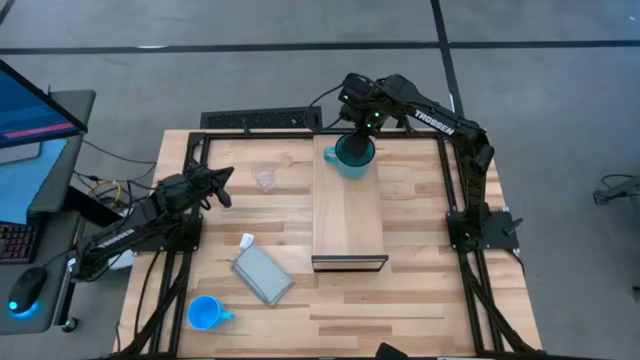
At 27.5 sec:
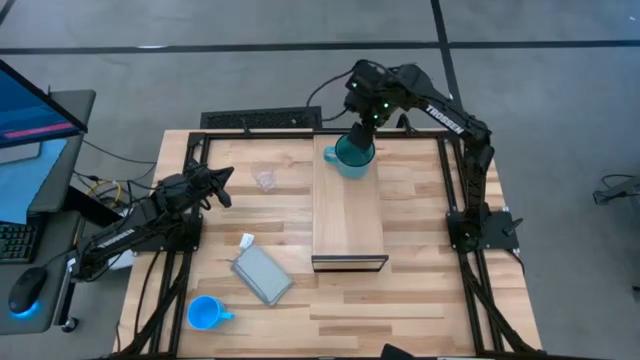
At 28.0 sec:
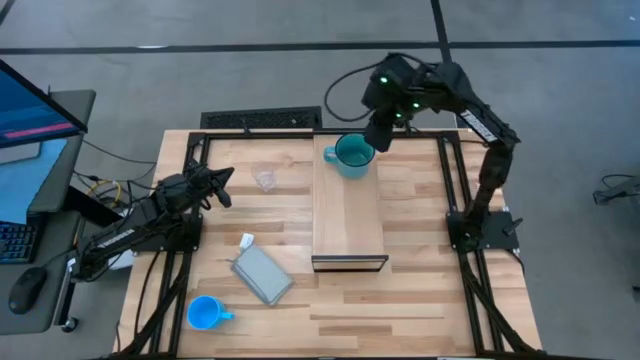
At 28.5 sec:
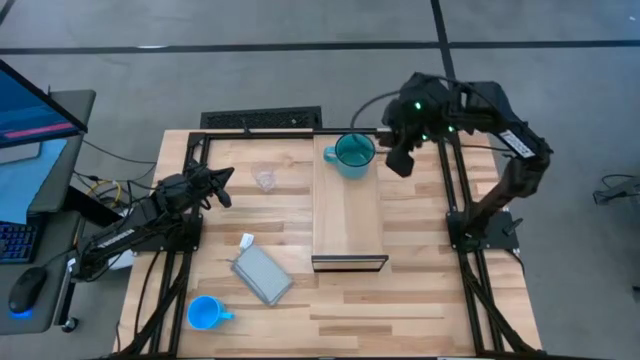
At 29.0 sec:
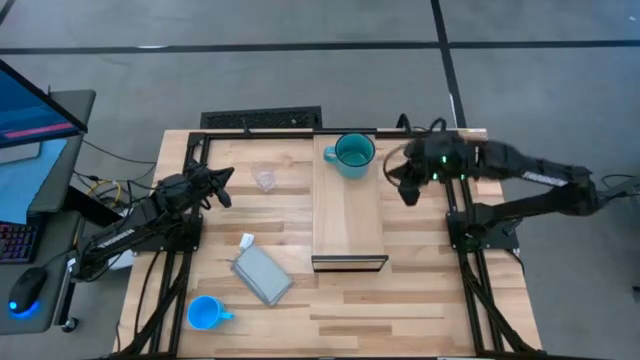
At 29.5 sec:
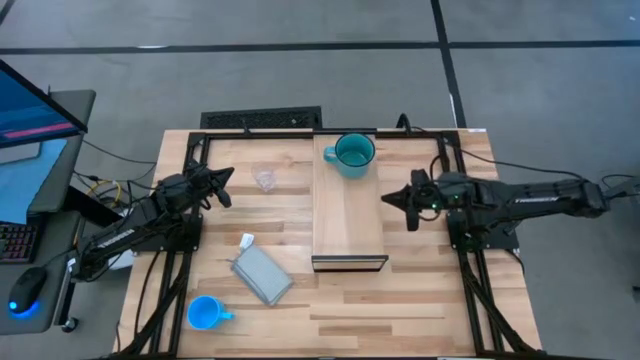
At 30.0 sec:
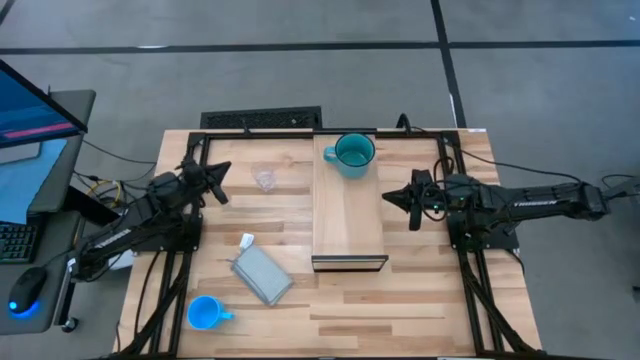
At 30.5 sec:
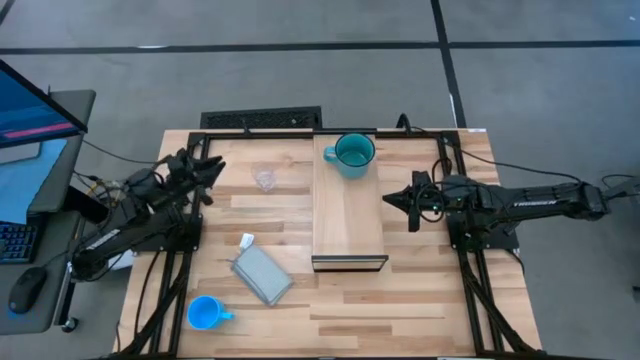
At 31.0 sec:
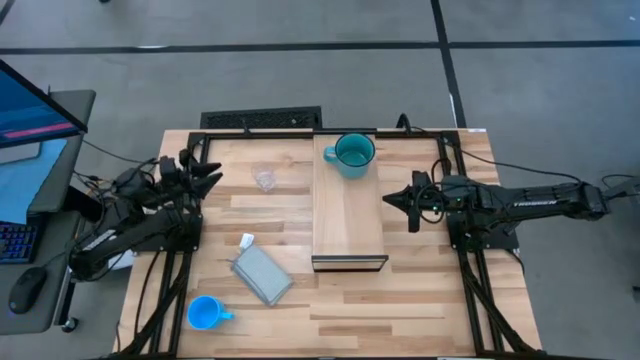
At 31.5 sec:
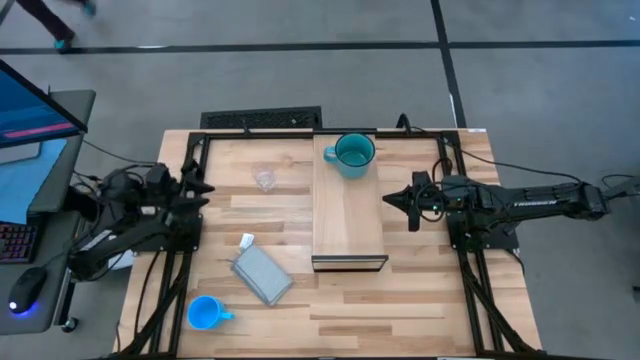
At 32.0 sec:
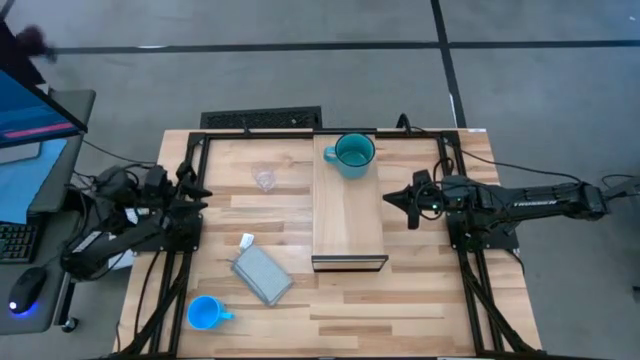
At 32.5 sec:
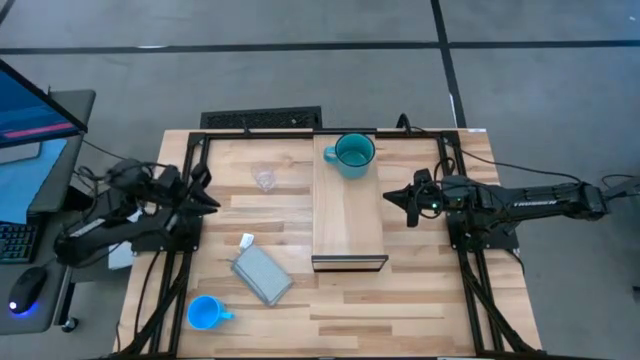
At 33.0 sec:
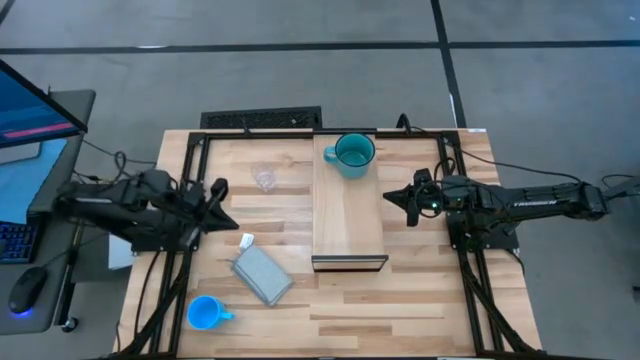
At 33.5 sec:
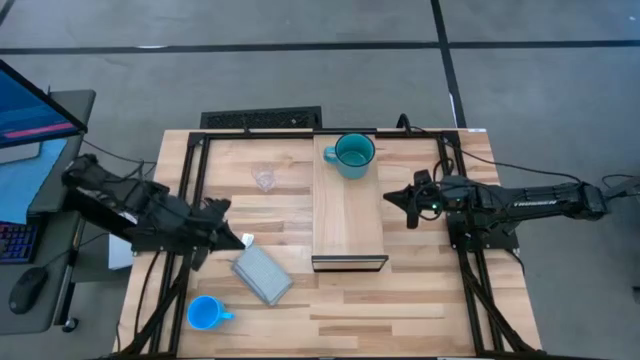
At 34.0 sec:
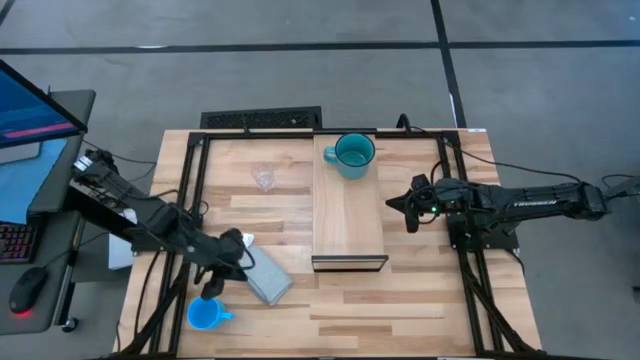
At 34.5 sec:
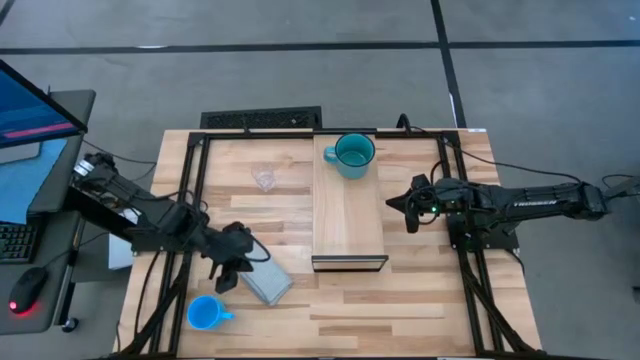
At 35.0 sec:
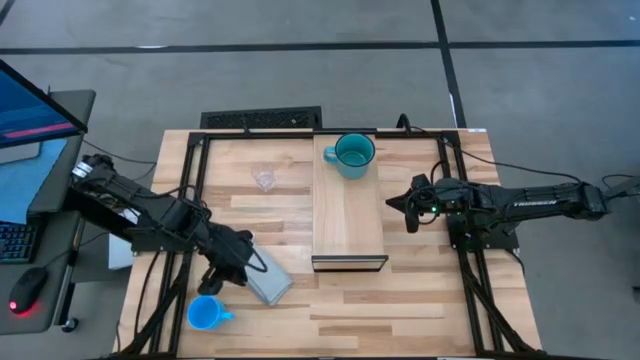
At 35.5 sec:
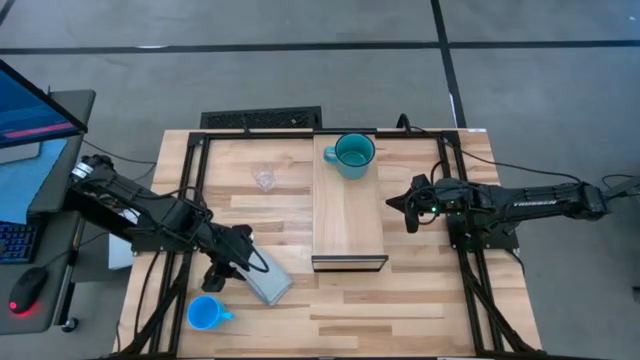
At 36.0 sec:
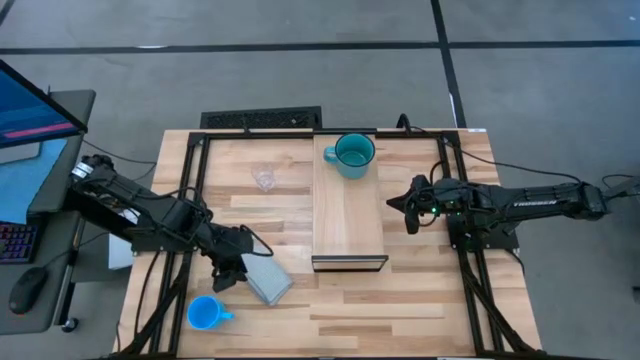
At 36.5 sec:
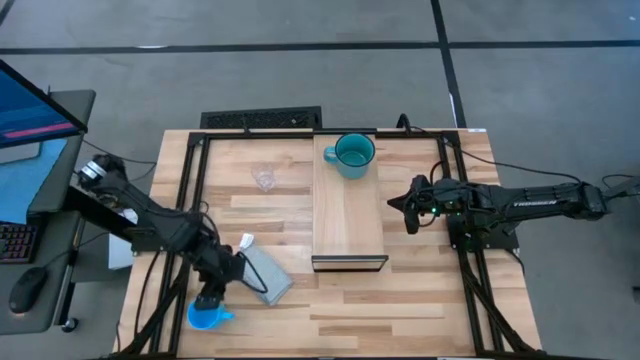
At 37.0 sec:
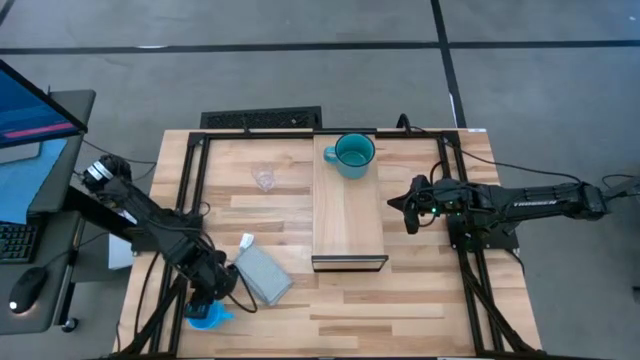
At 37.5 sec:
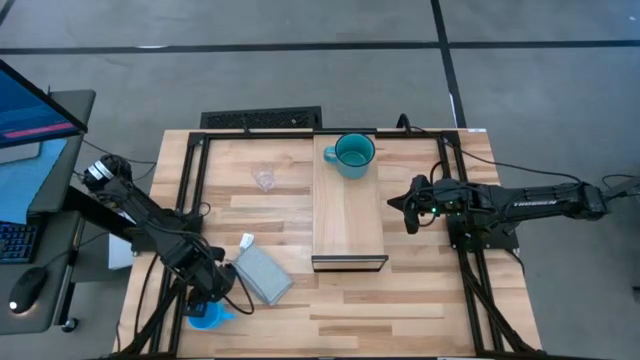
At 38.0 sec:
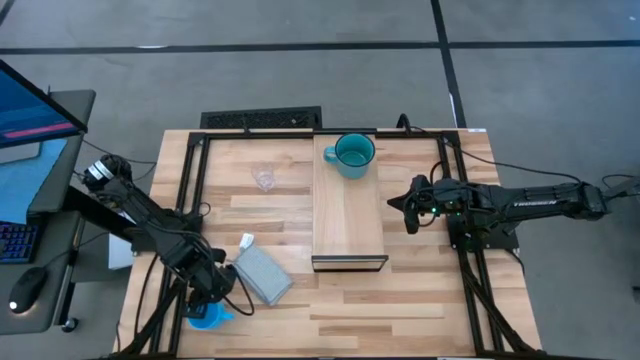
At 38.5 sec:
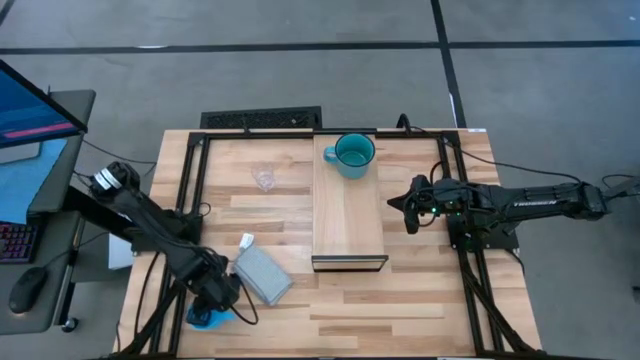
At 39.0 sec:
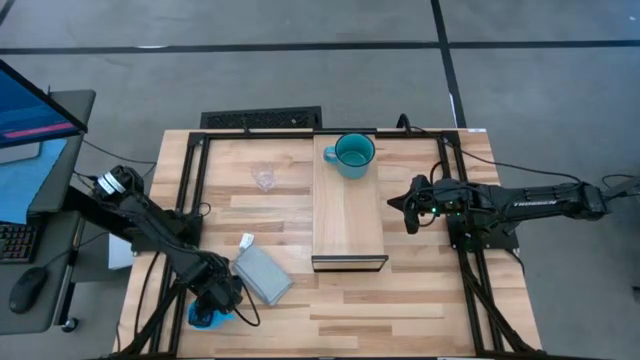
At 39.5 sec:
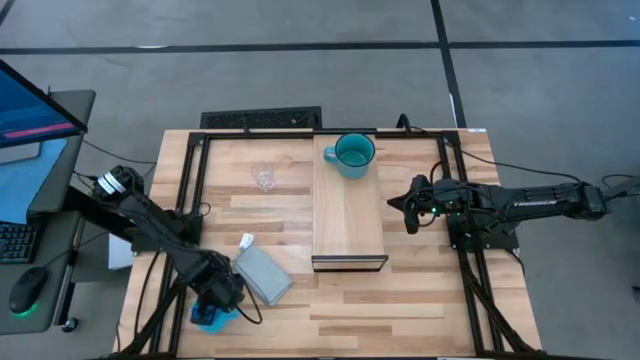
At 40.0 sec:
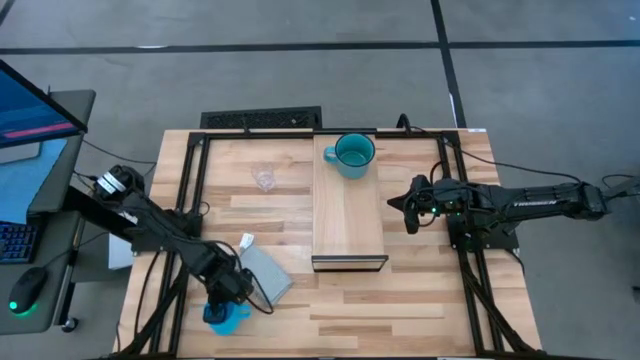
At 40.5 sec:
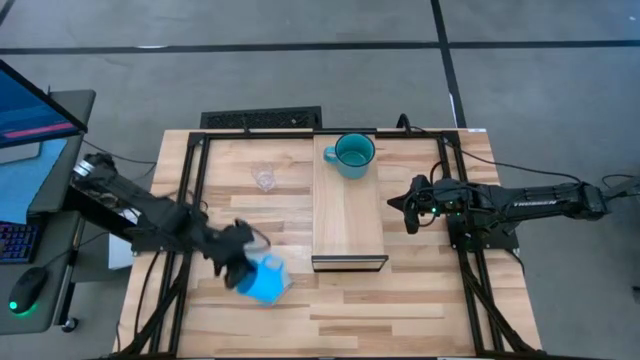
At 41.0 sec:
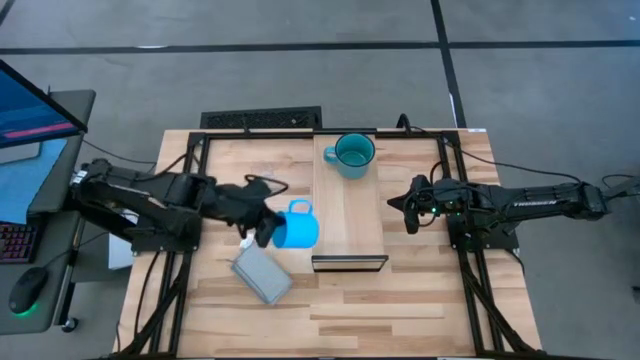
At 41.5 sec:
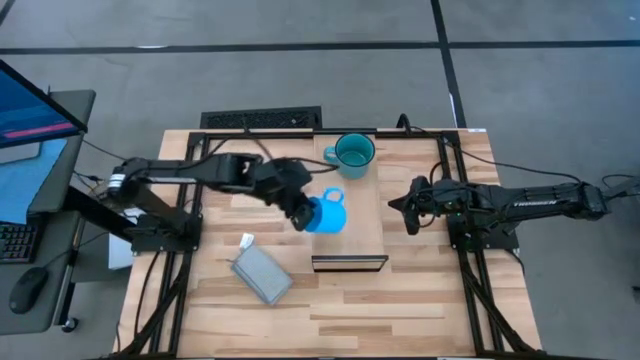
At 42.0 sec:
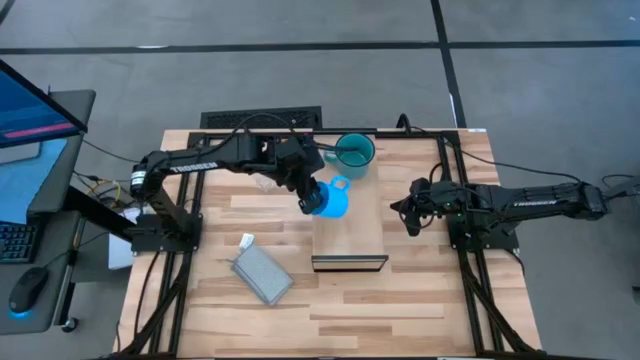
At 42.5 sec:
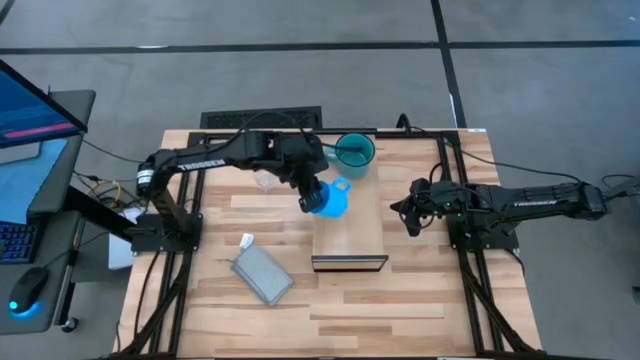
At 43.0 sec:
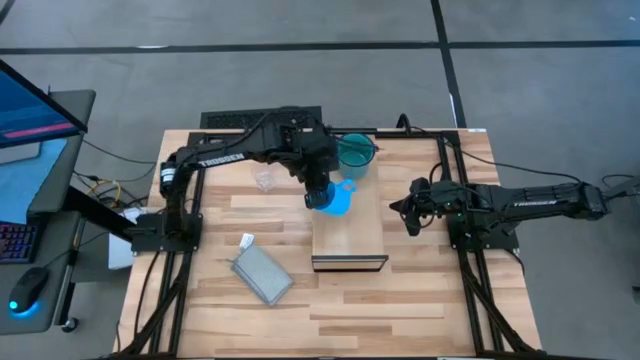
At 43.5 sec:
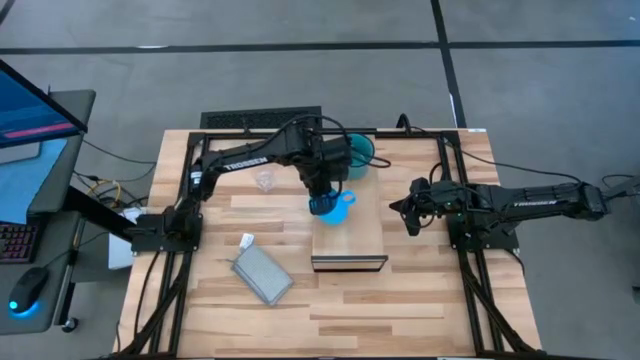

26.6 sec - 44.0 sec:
Task: Stack small to large cups/mugs on shelf
Put the light blue mug on the shelf
